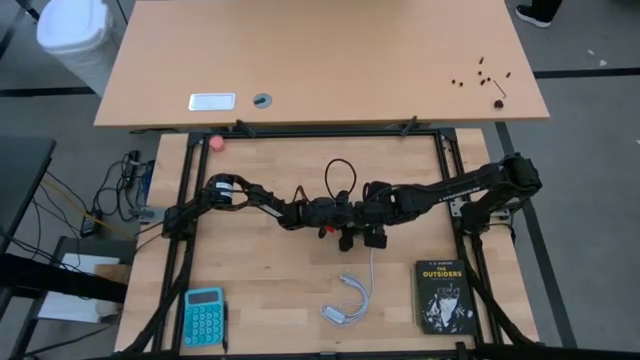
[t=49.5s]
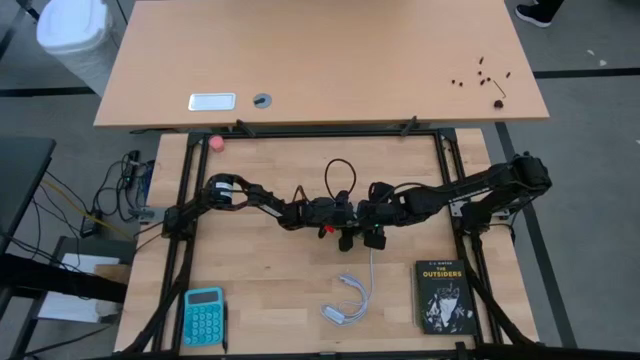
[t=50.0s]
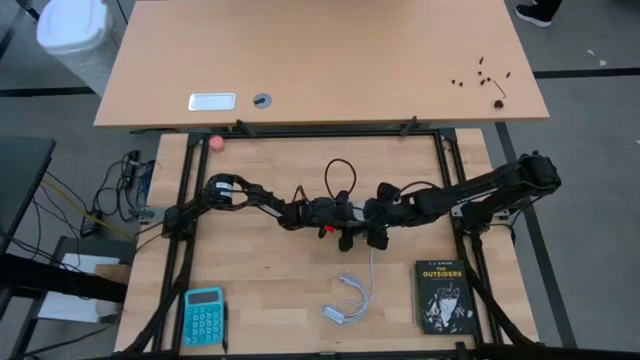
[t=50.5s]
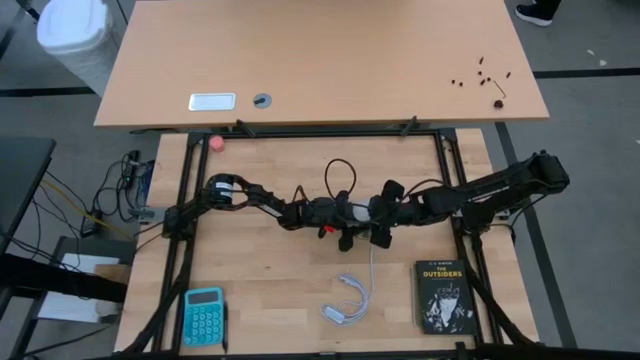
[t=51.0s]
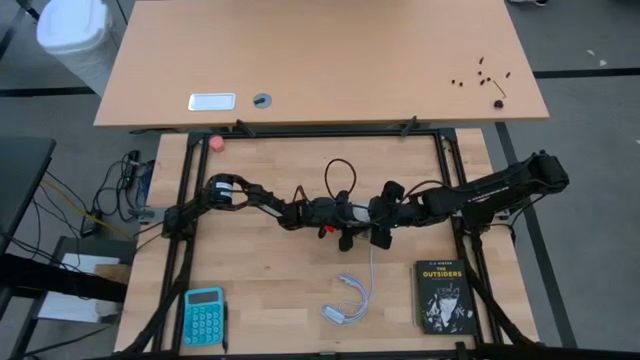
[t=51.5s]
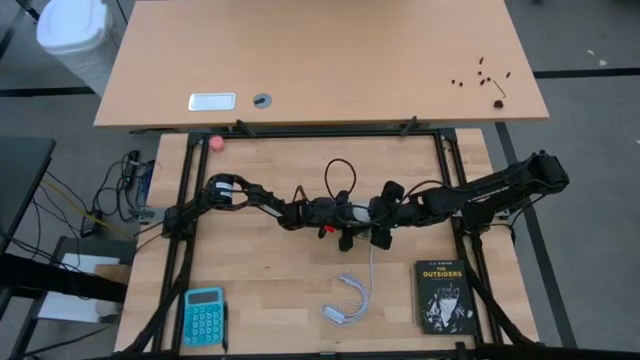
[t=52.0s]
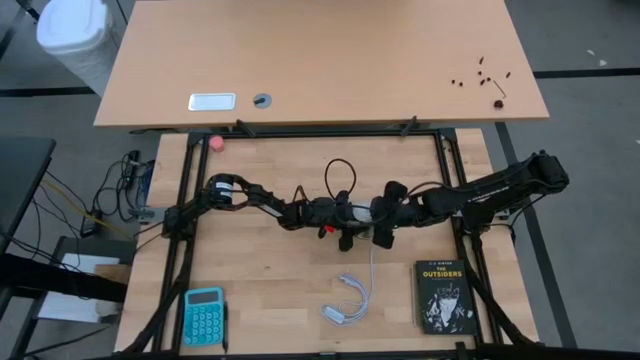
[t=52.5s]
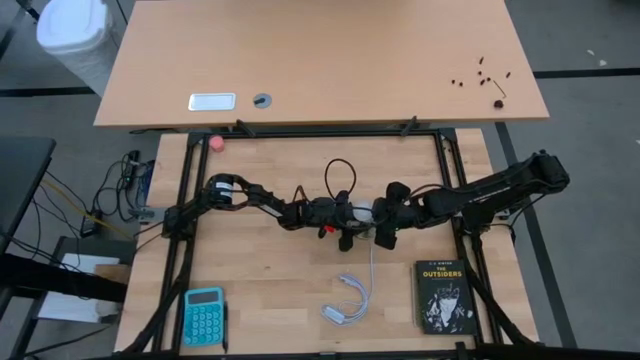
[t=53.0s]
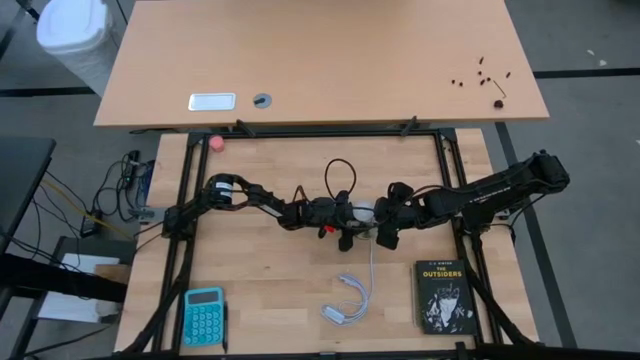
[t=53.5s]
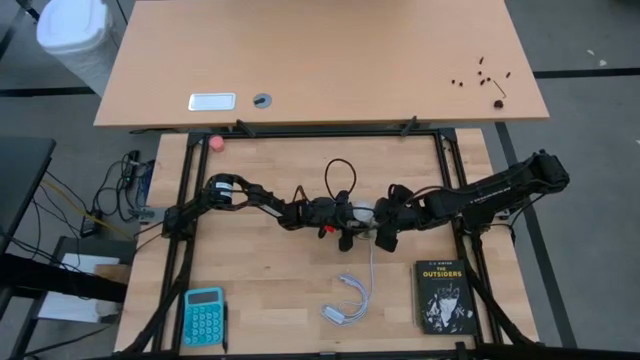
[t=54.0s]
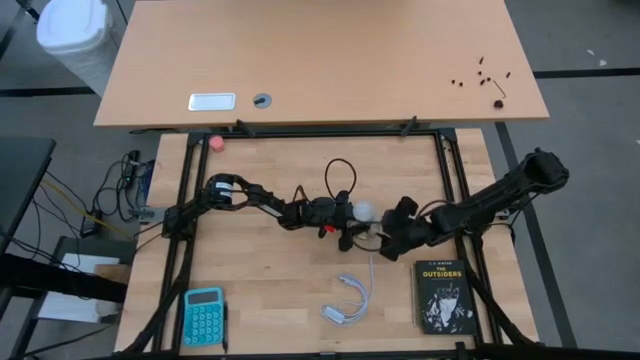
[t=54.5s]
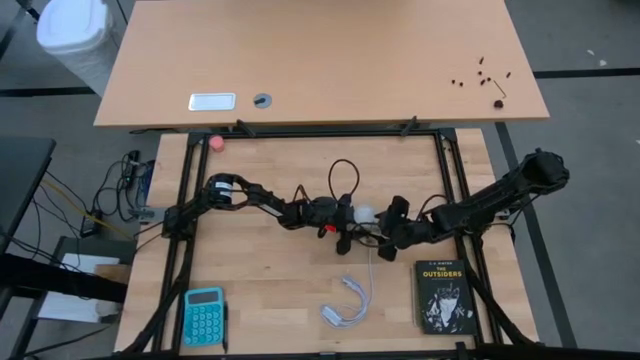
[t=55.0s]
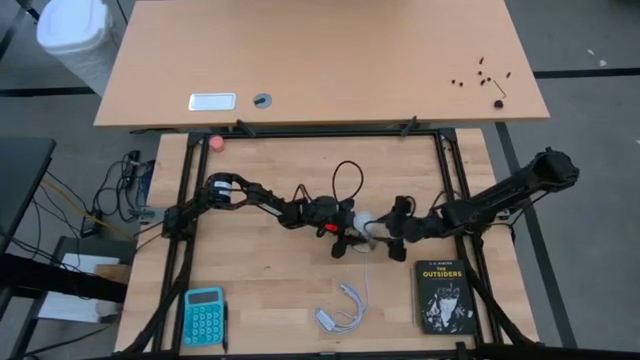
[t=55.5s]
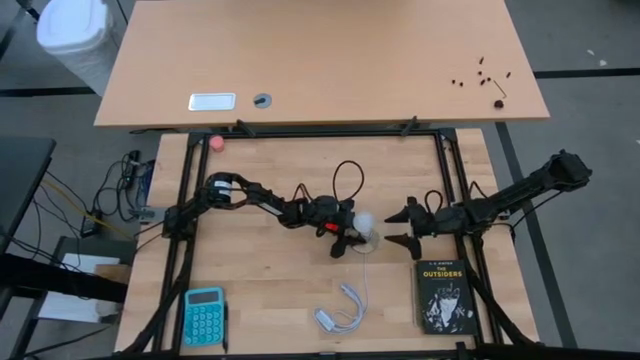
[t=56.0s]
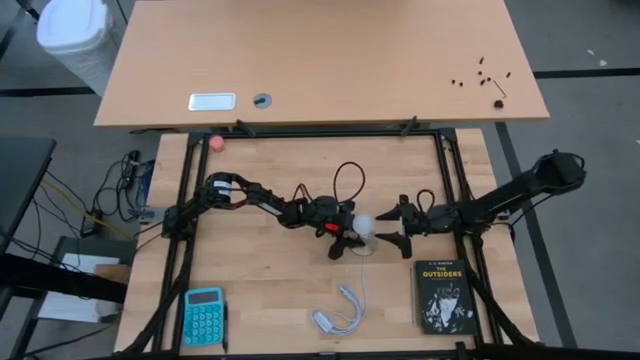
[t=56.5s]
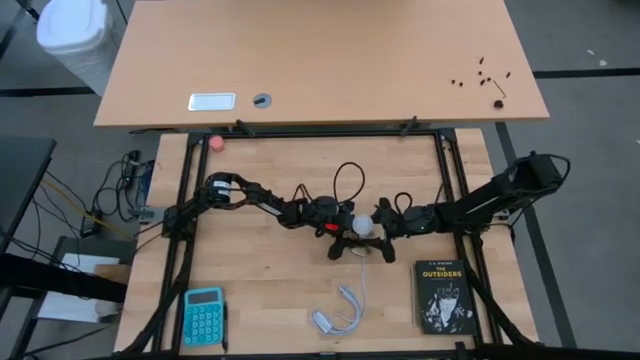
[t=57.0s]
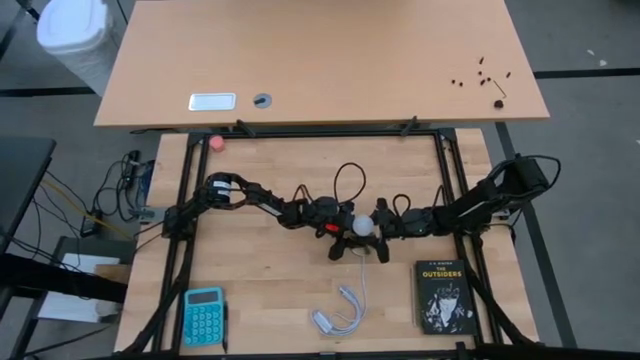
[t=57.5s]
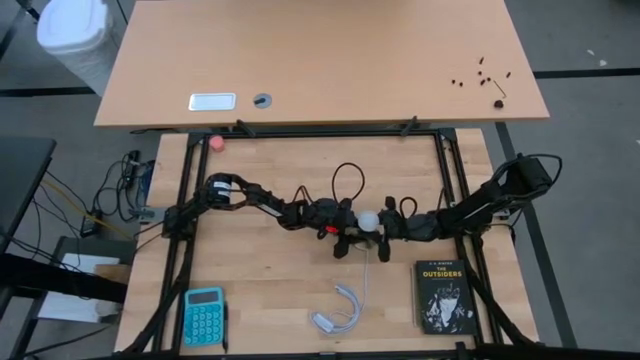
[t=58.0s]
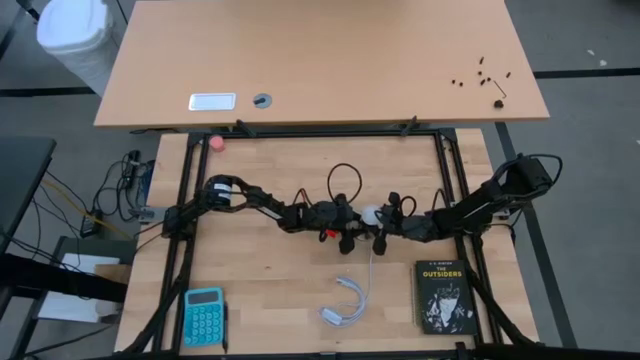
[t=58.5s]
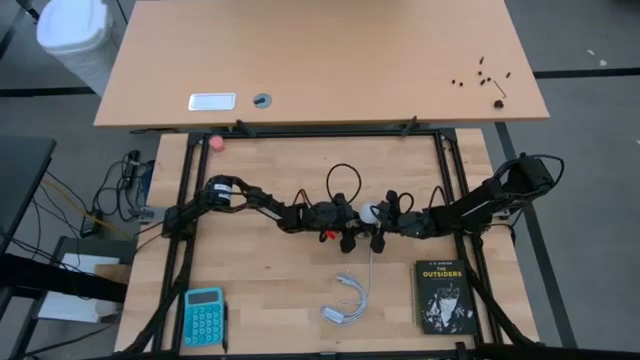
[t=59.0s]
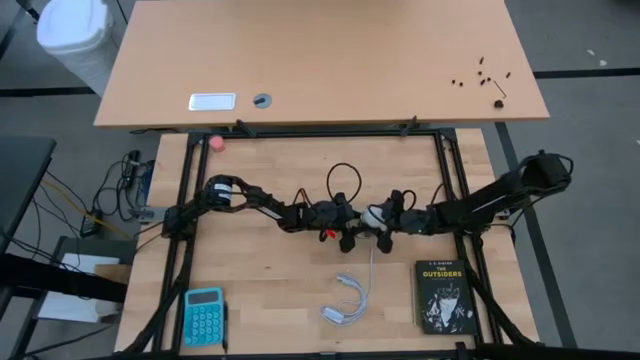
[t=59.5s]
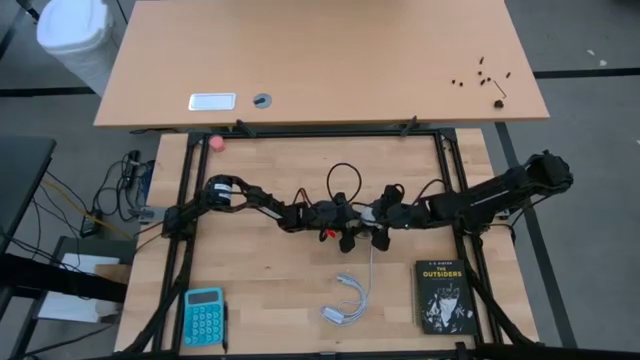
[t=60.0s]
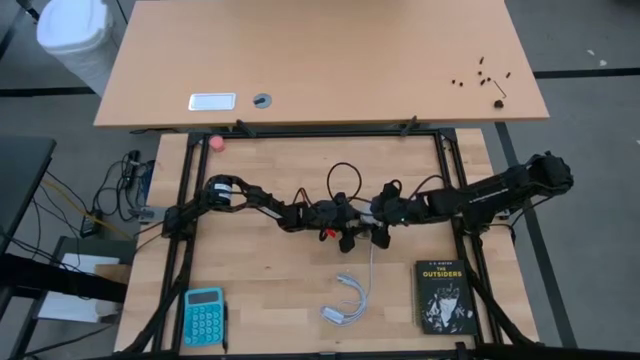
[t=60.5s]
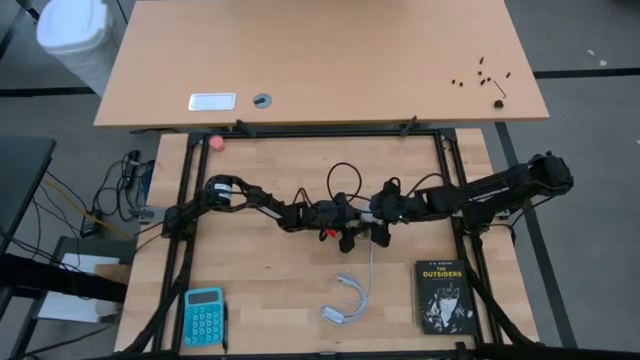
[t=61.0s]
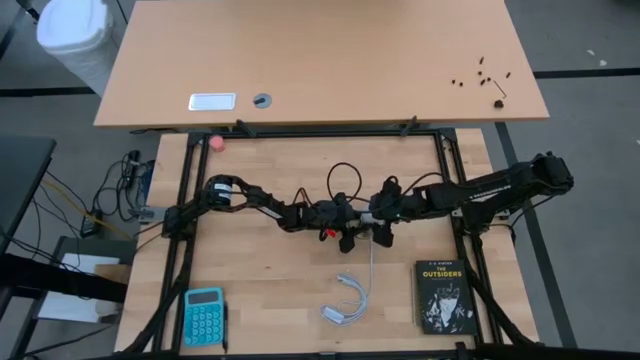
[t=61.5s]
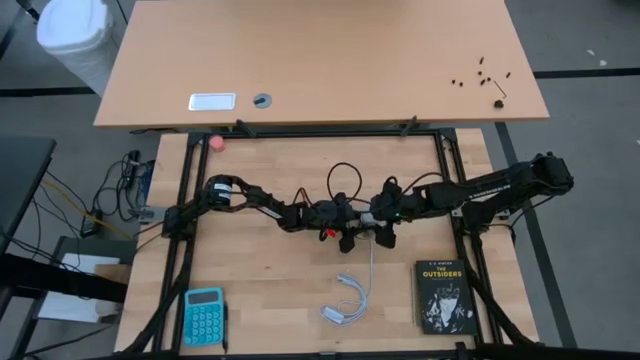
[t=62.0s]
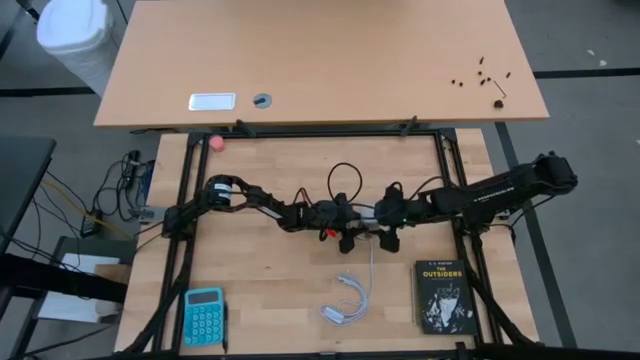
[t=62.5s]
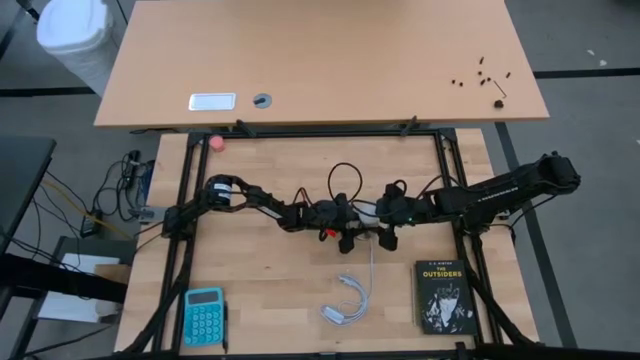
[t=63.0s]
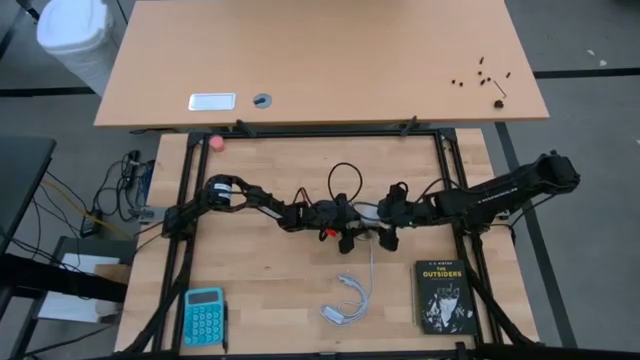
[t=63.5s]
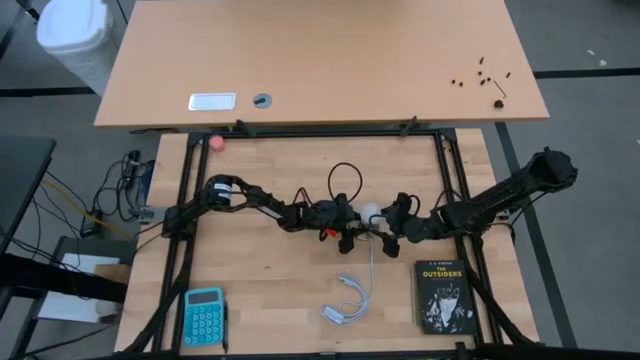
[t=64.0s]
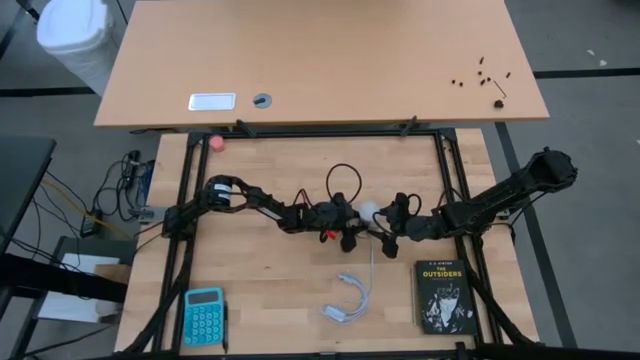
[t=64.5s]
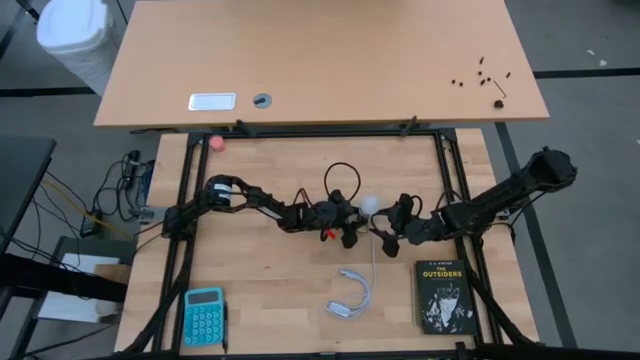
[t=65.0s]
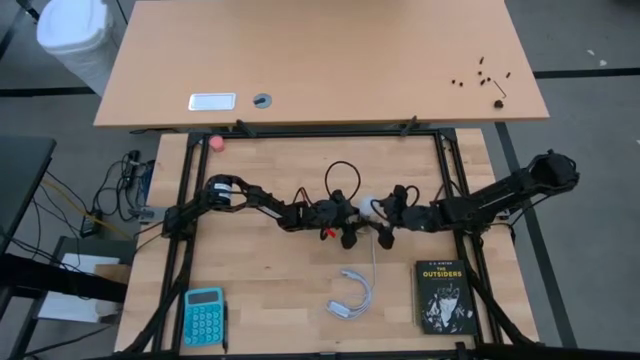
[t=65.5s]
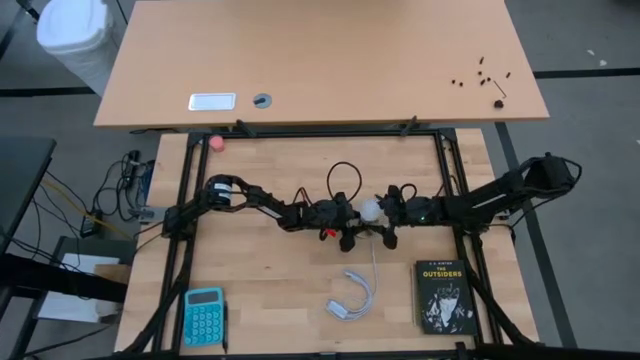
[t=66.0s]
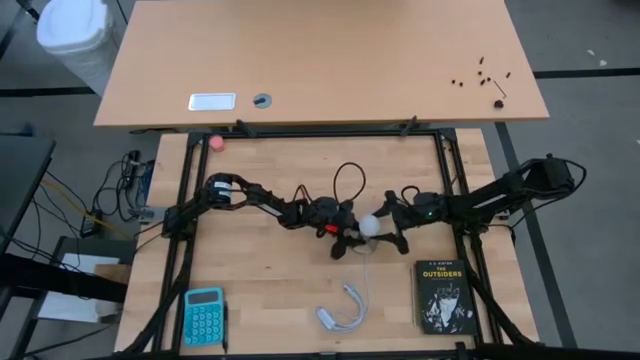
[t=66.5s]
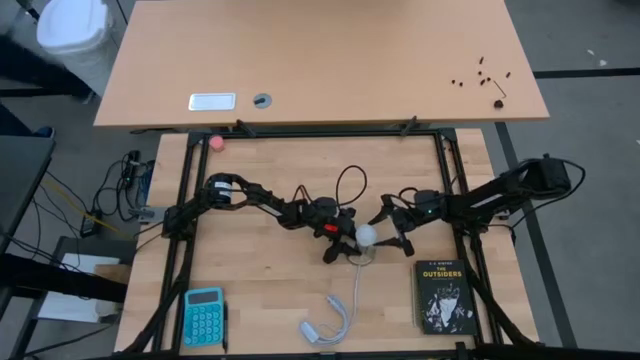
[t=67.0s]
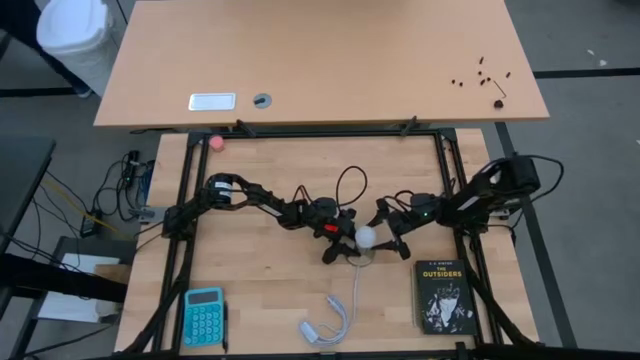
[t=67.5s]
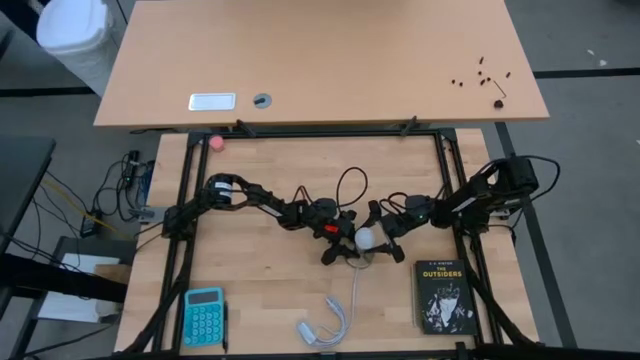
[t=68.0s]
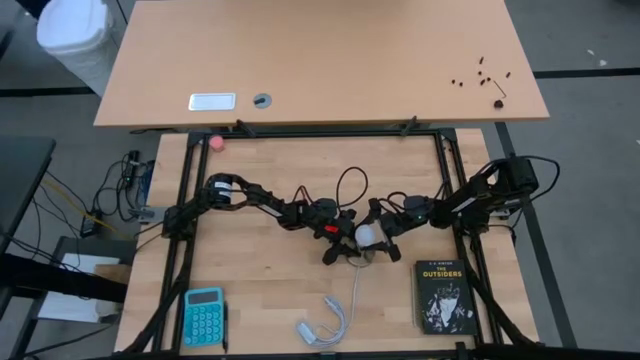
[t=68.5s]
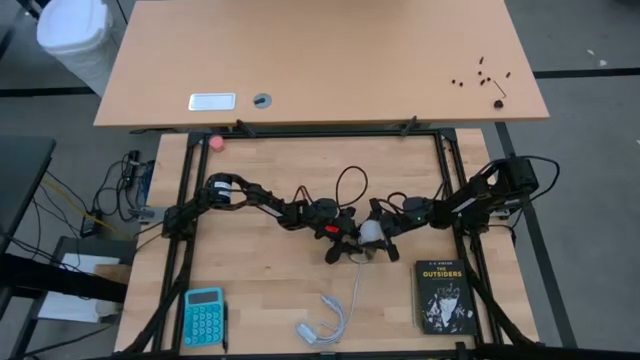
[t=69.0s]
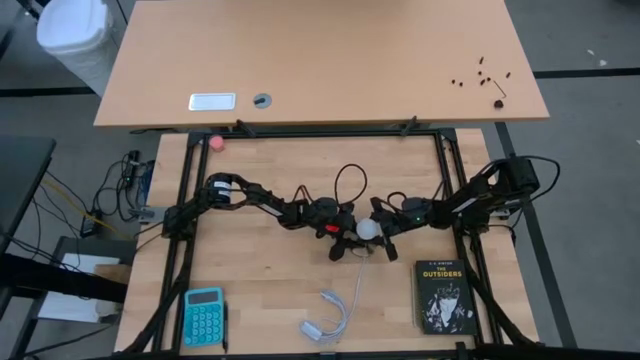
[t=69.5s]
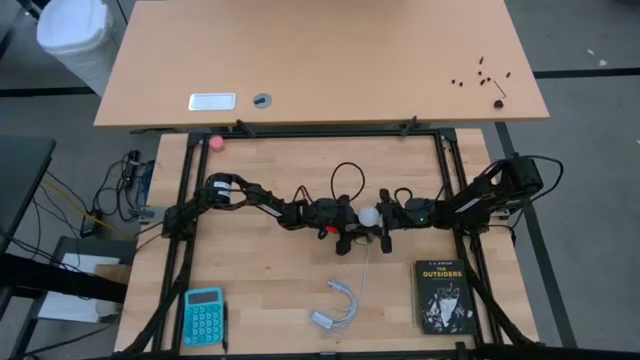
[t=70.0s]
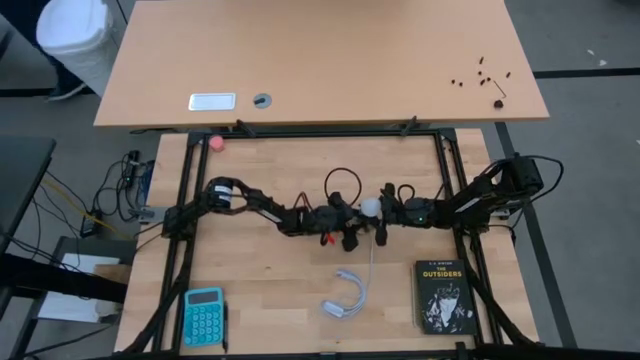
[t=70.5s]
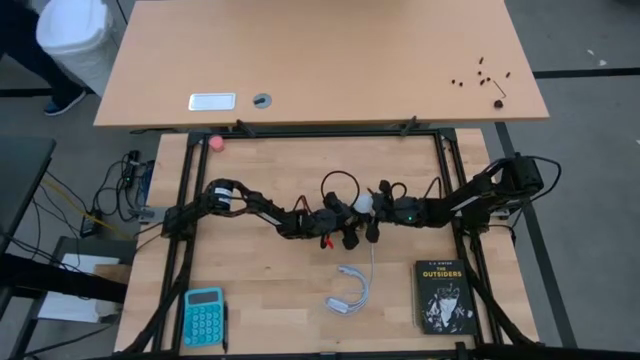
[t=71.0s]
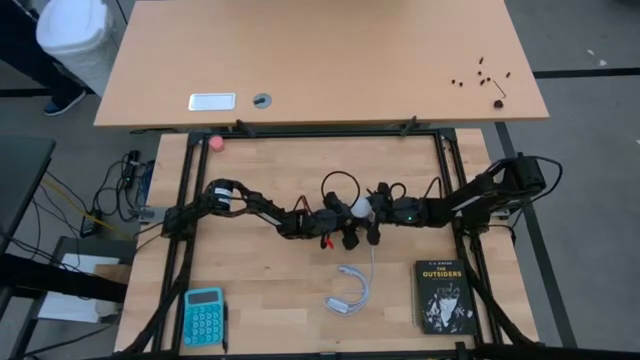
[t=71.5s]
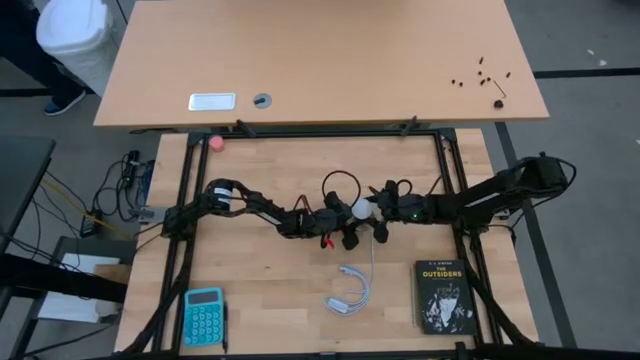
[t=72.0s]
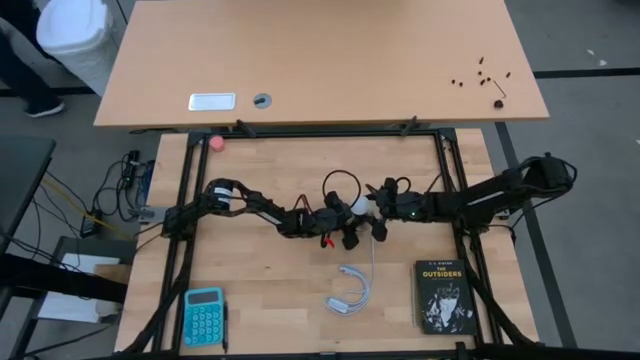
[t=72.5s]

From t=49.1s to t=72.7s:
Task: Screw lightbulb
Insert the white lightbulb into the silver lamp
